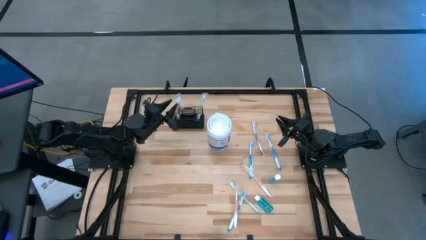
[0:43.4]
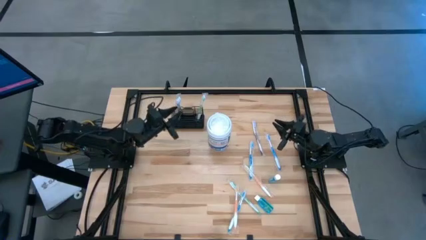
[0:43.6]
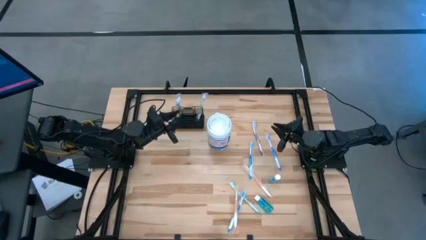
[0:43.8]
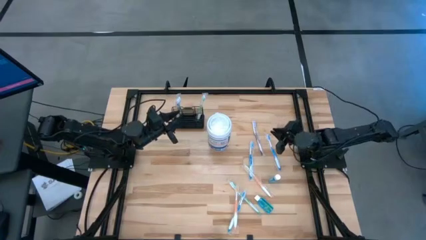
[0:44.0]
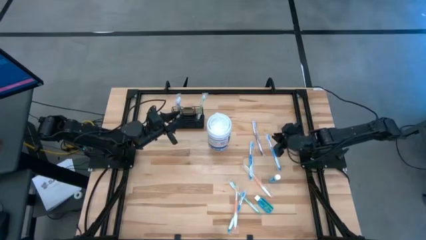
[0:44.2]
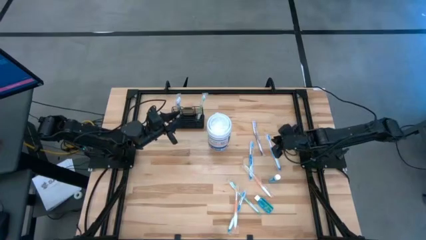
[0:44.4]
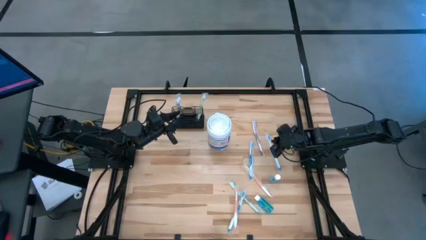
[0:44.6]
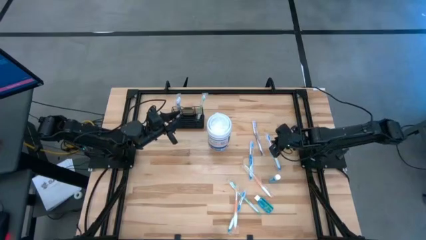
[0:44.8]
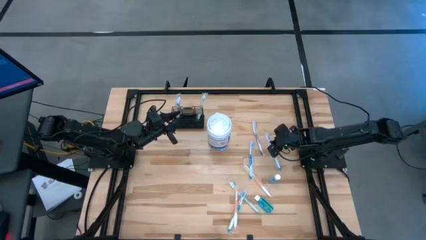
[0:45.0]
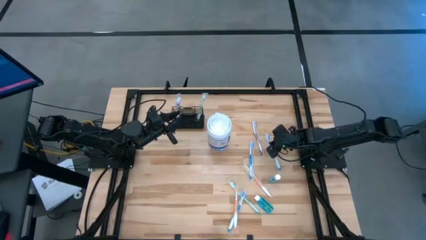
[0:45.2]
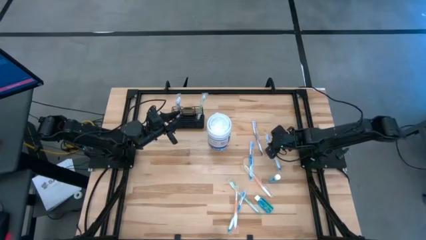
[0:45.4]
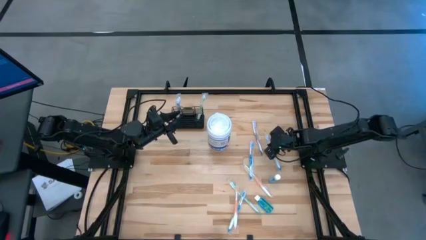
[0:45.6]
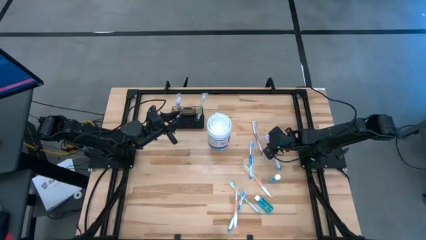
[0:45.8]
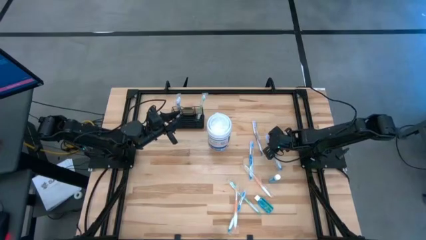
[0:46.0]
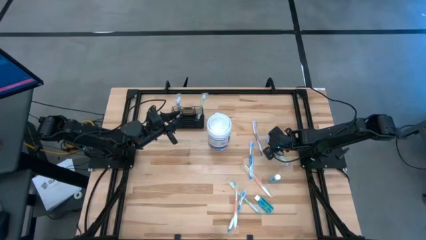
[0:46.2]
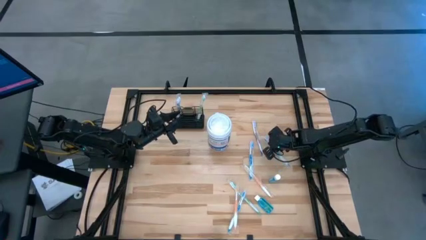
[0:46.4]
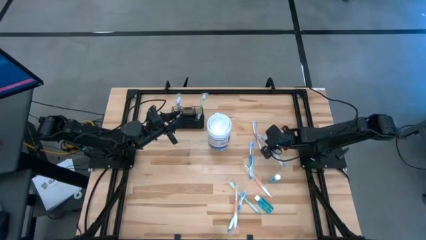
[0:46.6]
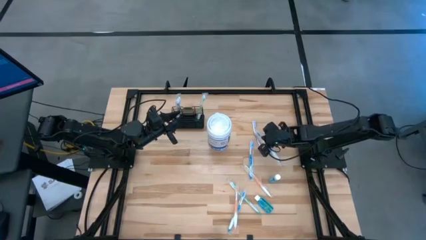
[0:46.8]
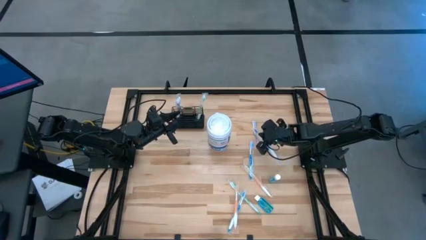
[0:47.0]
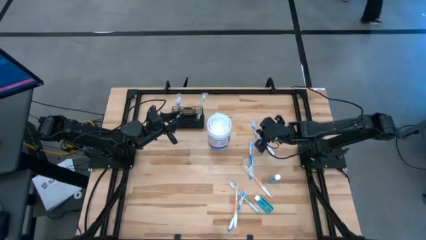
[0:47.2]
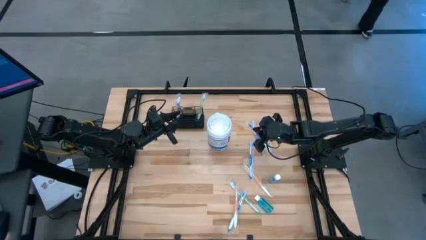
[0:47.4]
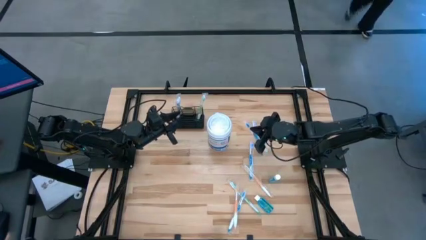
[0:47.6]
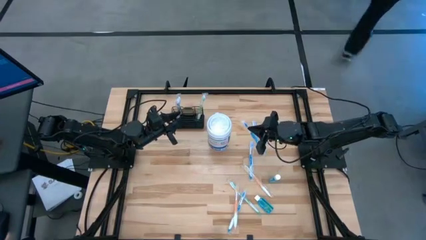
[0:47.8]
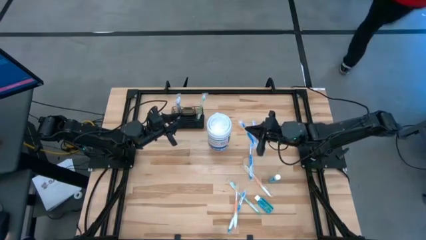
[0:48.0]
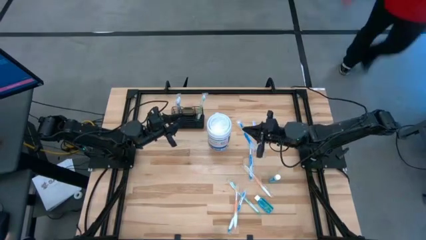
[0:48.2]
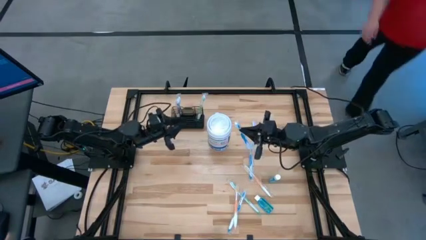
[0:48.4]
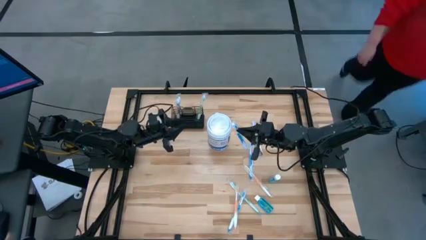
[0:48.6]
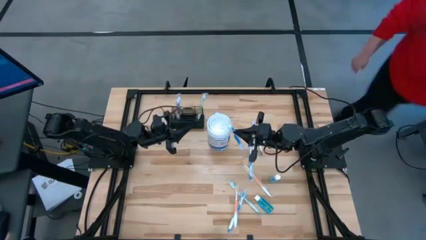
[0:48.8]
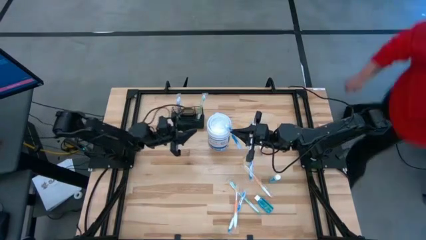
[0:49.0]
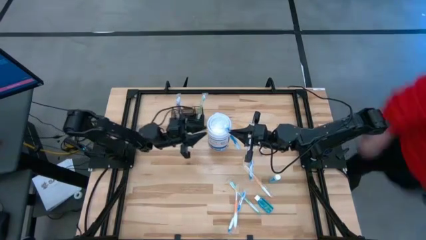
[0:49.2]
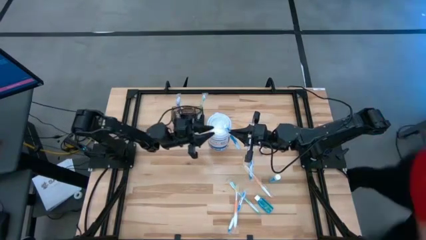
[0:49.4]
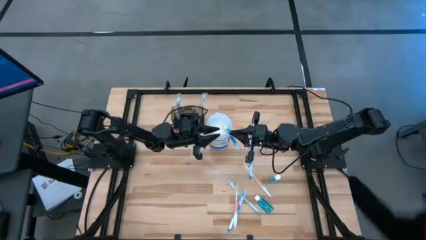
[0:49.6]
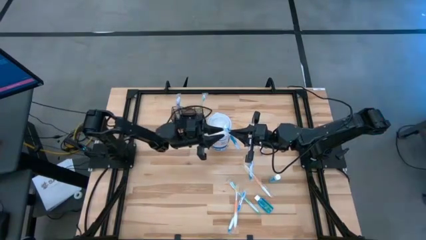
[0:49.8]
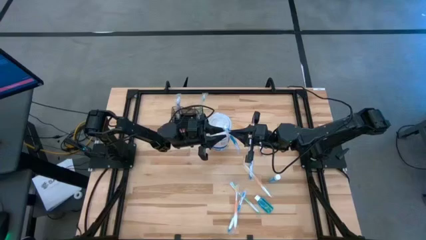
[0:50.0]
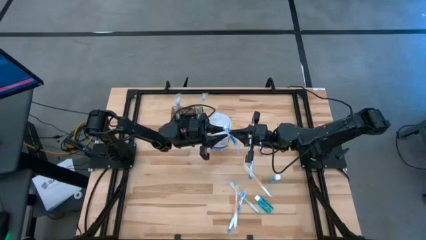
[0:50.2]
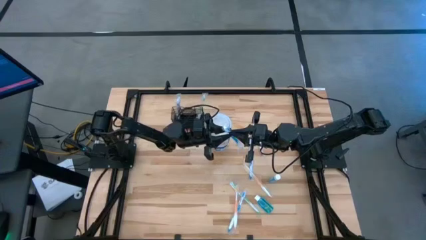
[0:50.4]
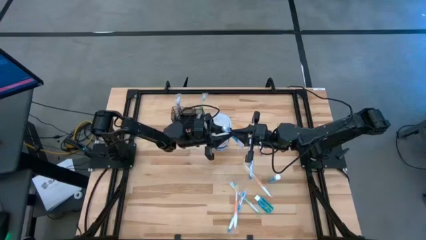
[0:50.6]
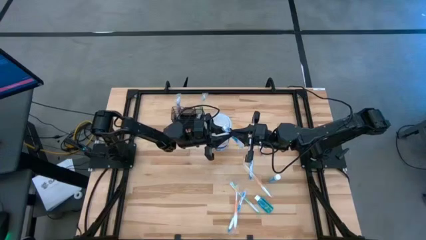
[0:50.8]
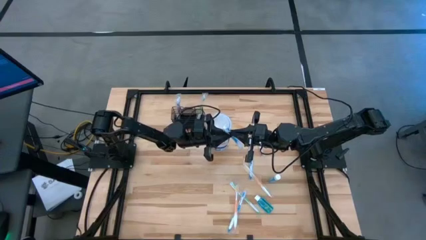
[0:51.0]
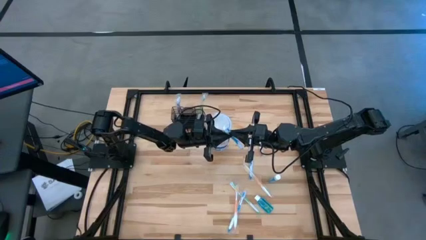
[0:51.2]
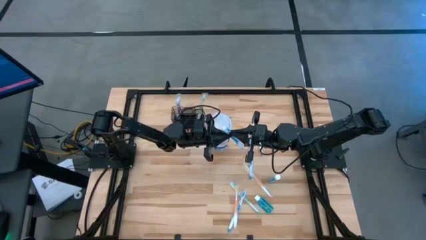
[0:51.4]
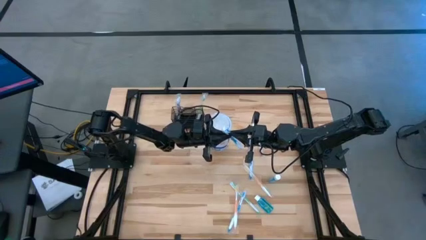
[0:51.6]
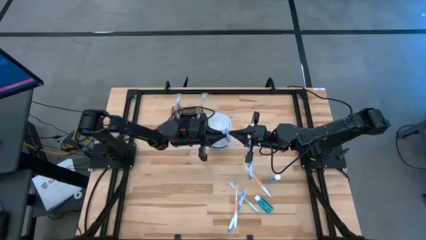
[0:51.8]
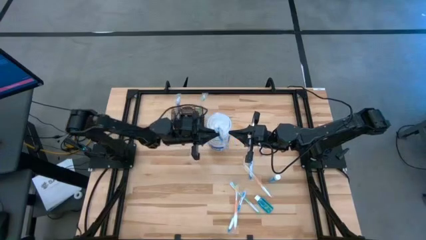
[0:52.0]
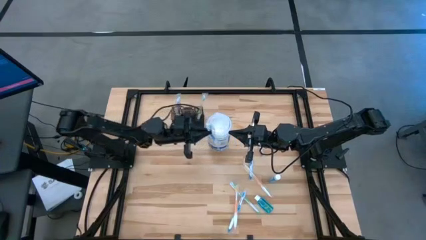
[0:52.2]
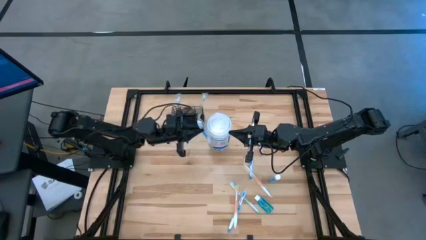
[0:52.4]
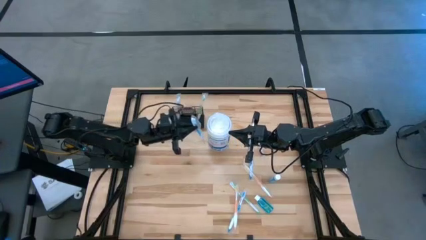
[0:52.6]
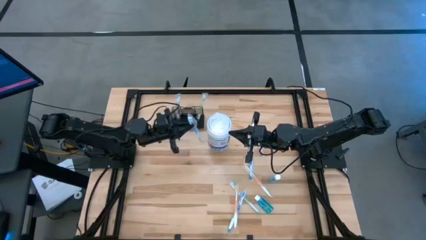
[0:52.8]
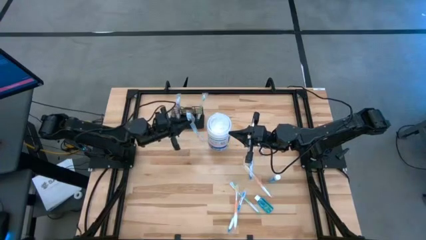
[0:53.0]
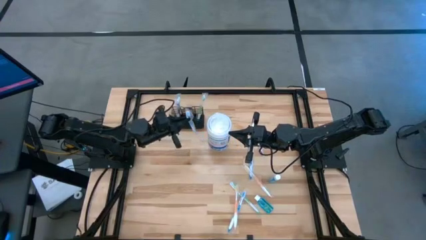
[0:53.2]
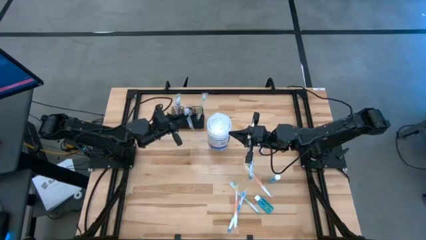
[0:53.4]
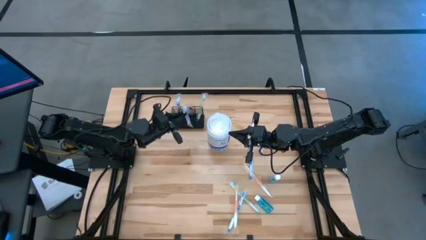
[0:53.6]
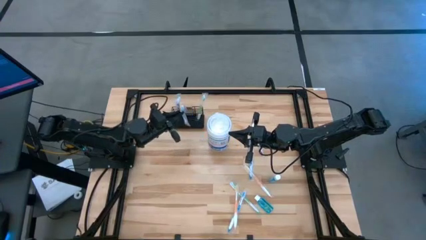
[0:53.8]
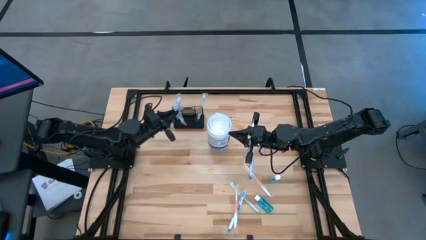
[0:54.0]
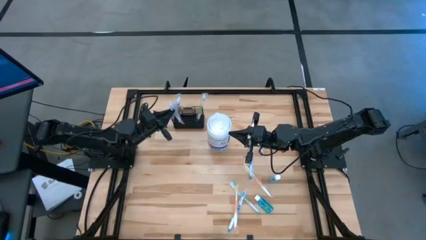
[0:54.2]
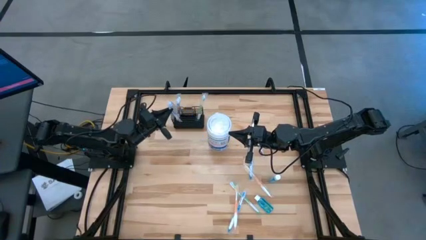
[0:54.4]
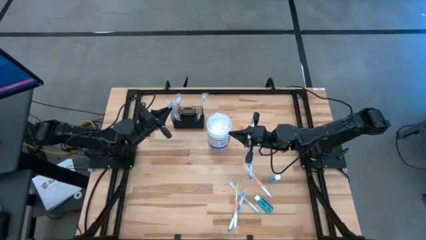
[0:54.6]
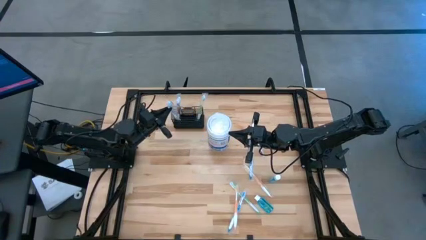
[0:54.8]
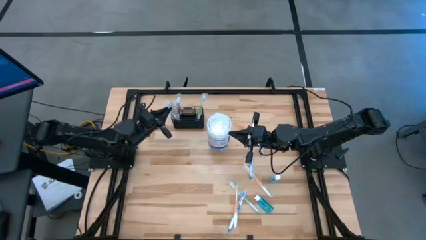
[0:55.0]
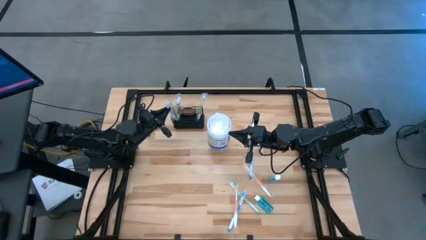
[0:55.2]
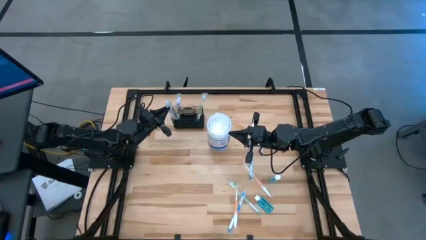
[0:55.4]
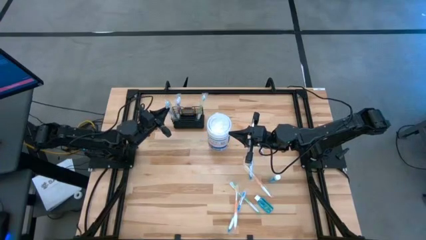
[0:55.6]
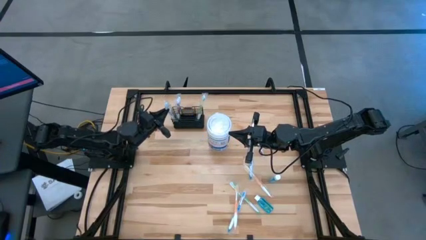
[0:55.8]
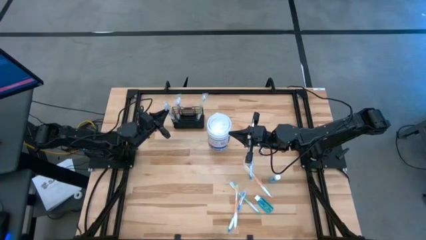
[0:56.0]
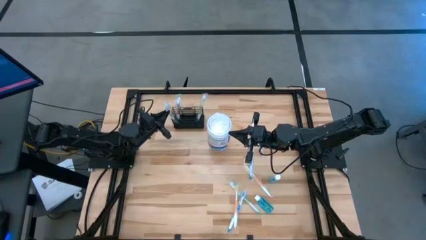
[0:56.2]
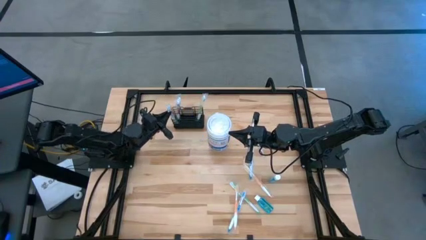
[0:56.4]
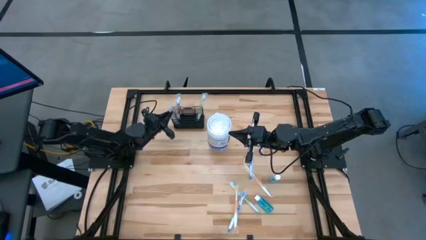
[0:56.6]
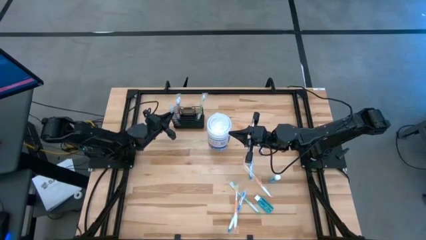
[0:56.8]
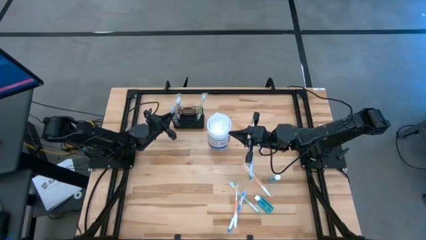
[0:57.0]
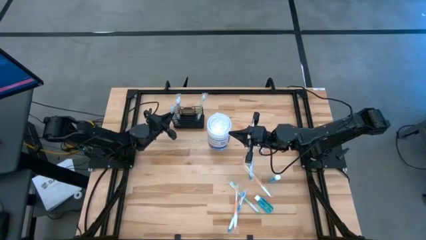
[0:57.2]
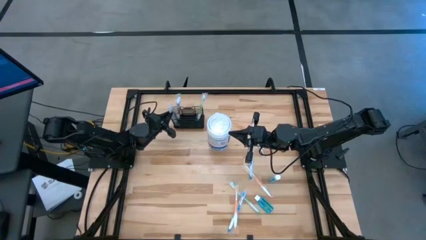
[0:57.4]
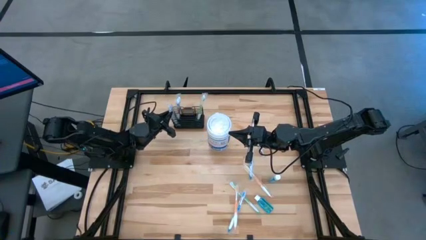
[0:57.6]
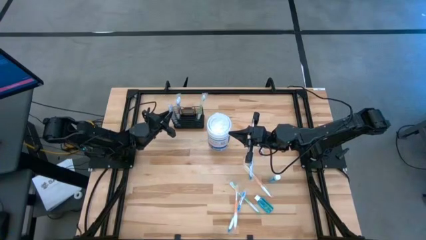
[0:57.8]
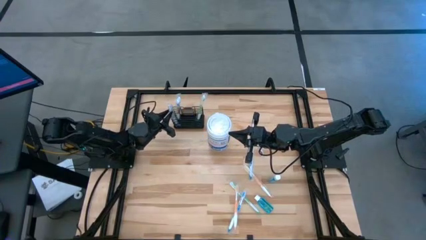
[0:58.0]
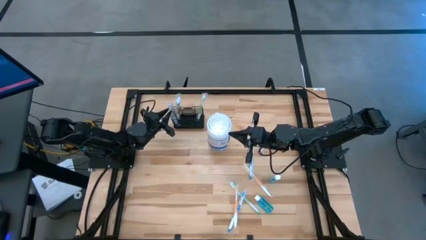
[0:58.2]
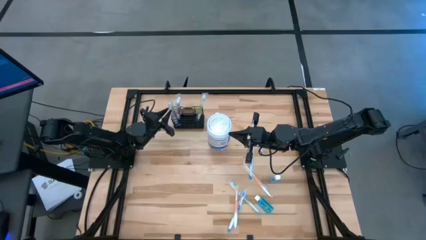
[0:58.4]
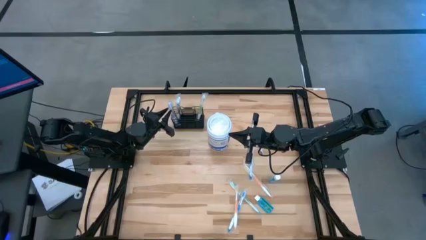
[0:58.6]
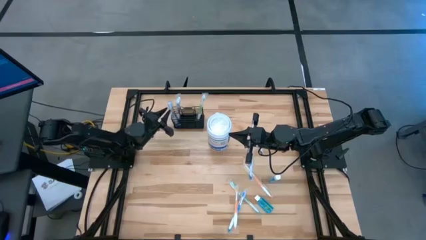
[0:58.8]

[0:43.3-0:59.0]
Task: Pick & Place toothbrushing station
Put the top right blue toothbrush into the mesh organizer
